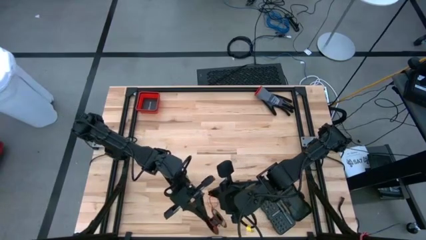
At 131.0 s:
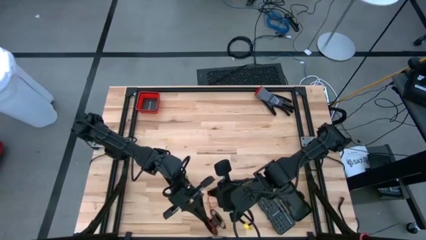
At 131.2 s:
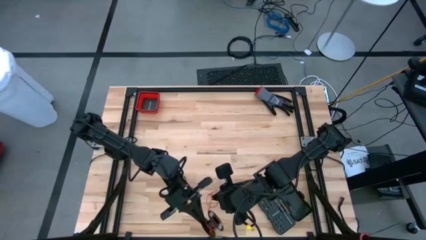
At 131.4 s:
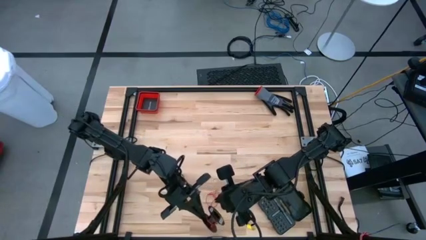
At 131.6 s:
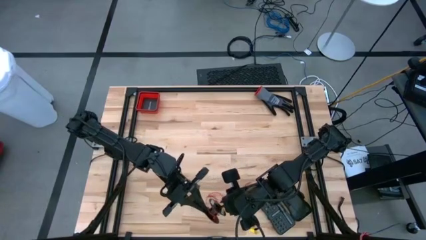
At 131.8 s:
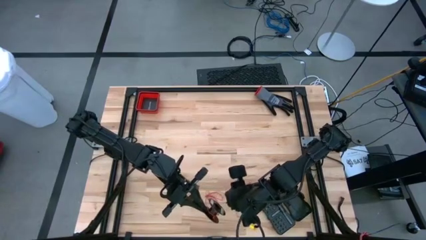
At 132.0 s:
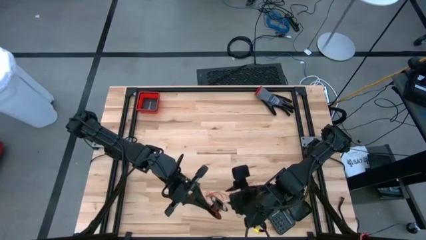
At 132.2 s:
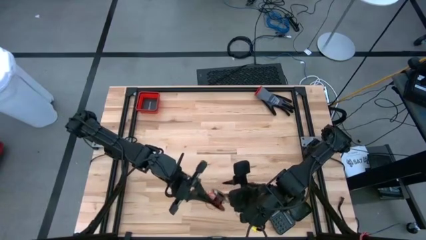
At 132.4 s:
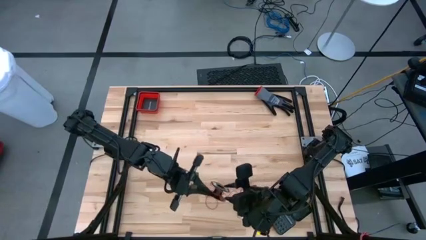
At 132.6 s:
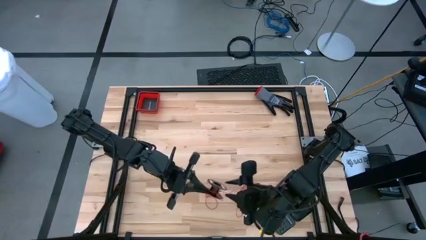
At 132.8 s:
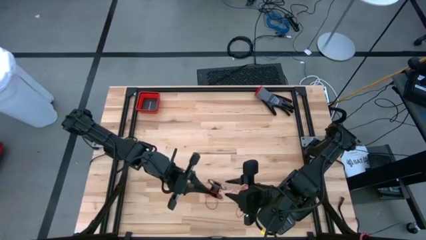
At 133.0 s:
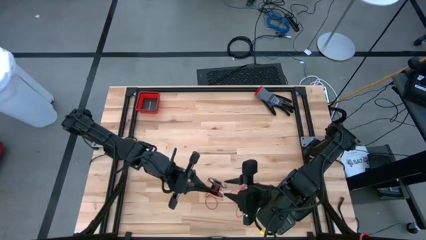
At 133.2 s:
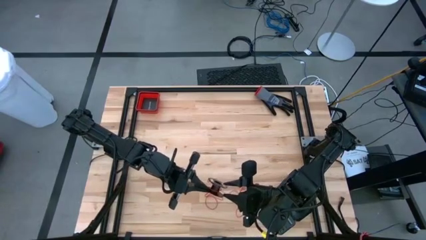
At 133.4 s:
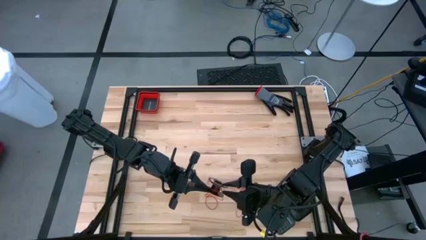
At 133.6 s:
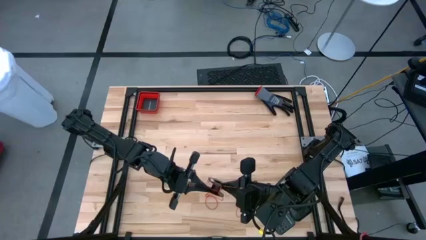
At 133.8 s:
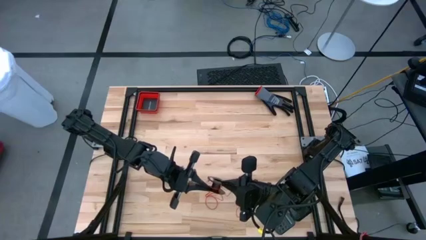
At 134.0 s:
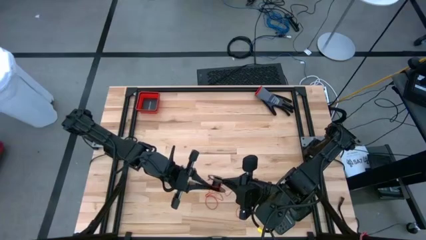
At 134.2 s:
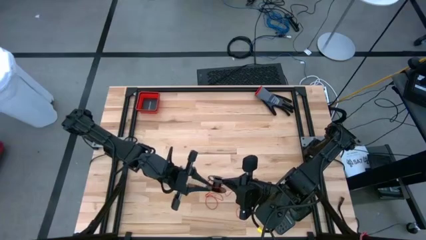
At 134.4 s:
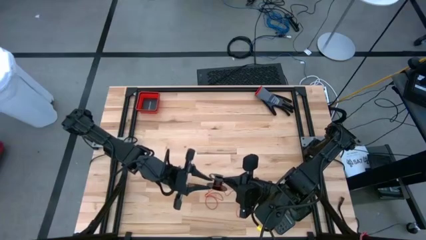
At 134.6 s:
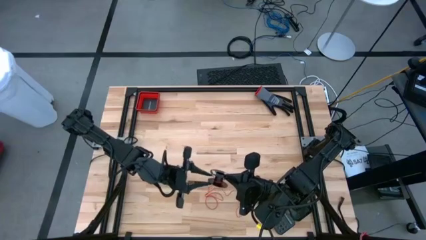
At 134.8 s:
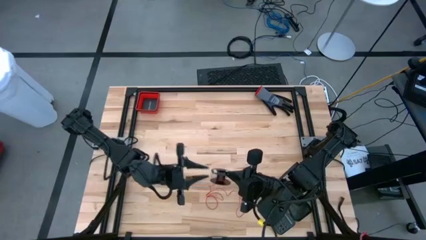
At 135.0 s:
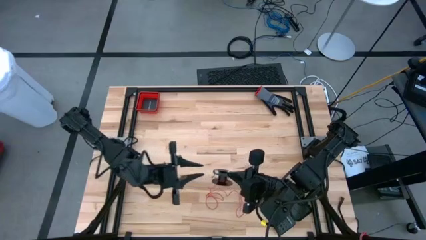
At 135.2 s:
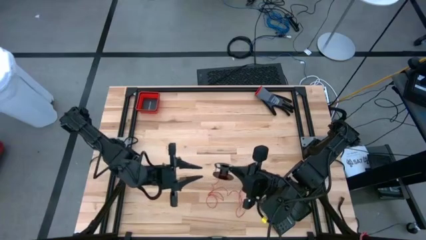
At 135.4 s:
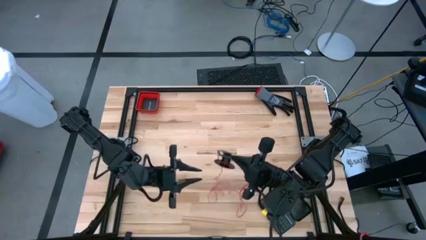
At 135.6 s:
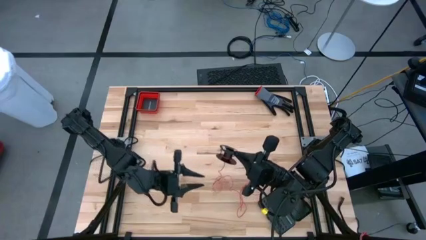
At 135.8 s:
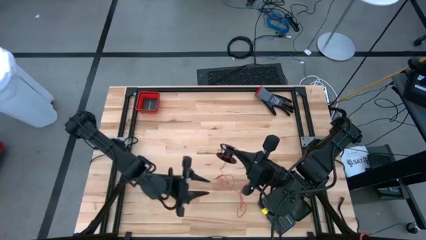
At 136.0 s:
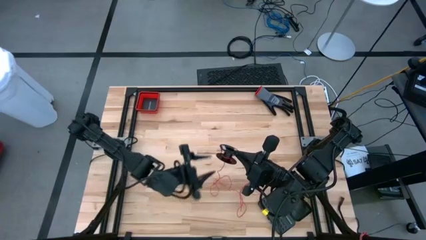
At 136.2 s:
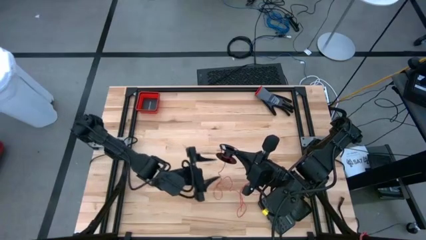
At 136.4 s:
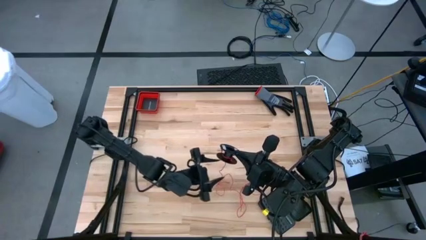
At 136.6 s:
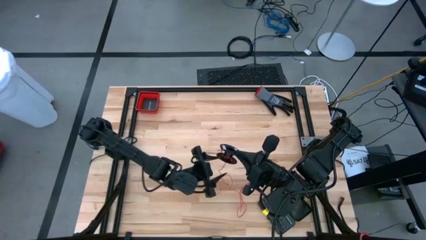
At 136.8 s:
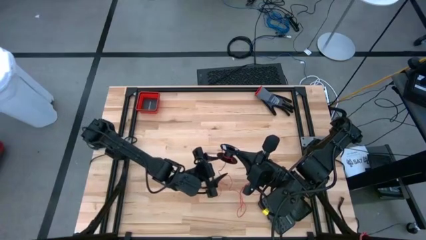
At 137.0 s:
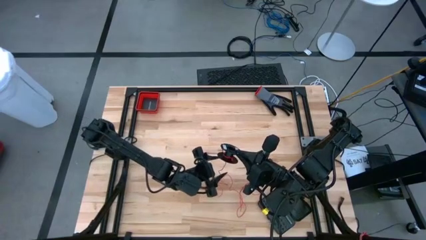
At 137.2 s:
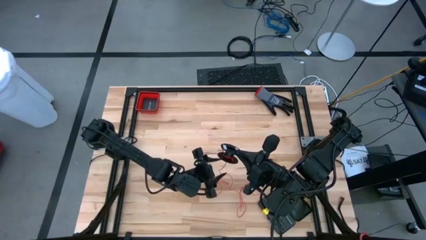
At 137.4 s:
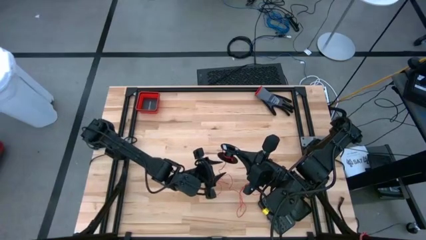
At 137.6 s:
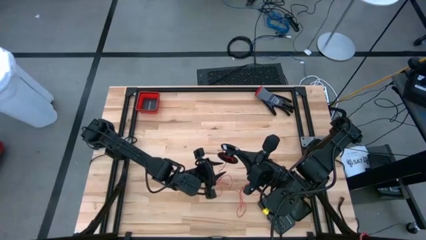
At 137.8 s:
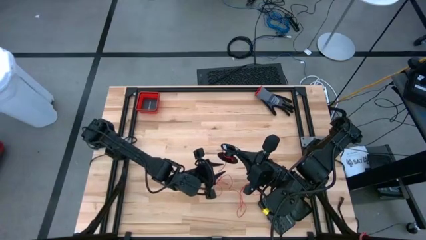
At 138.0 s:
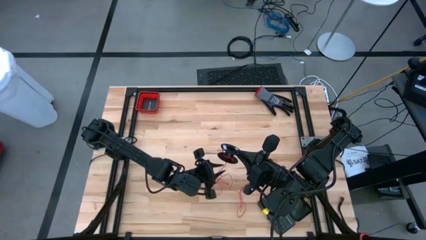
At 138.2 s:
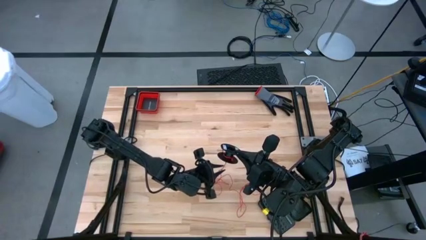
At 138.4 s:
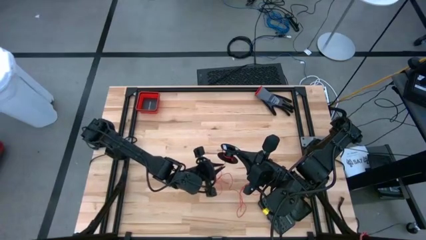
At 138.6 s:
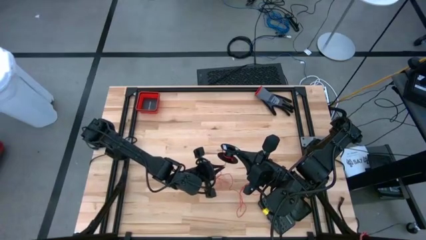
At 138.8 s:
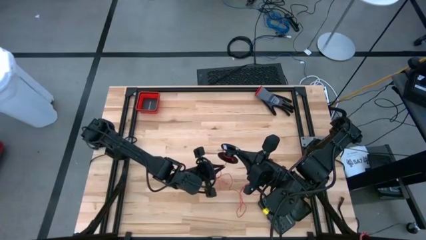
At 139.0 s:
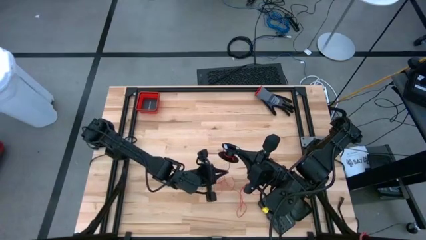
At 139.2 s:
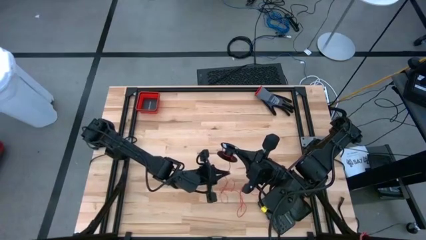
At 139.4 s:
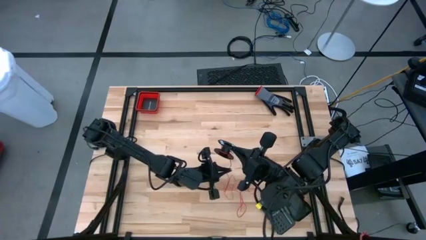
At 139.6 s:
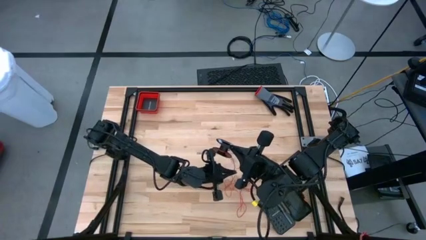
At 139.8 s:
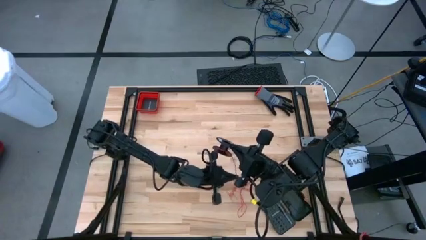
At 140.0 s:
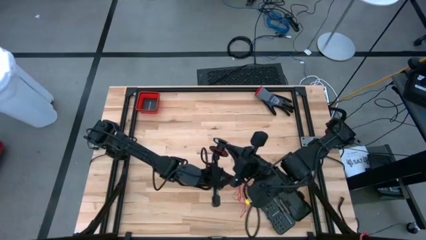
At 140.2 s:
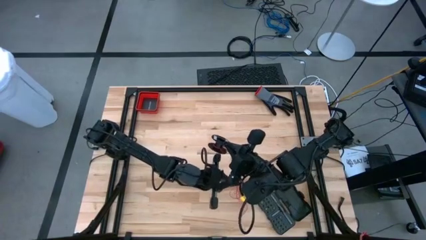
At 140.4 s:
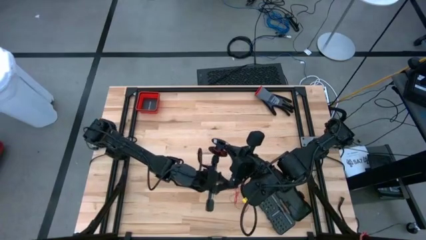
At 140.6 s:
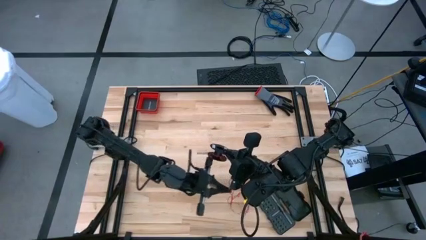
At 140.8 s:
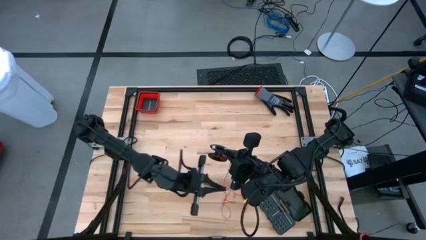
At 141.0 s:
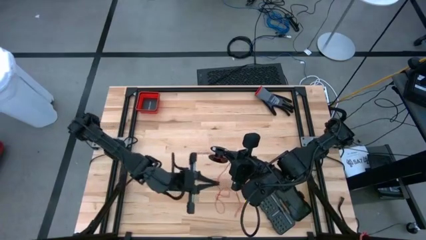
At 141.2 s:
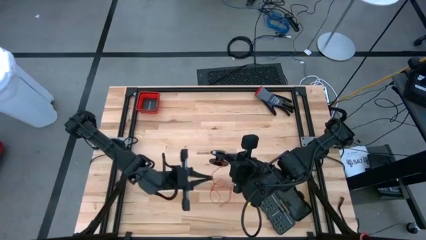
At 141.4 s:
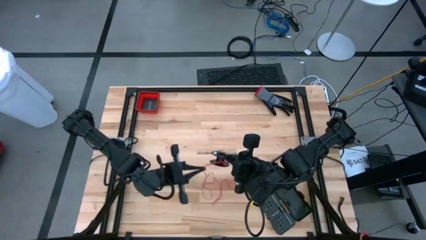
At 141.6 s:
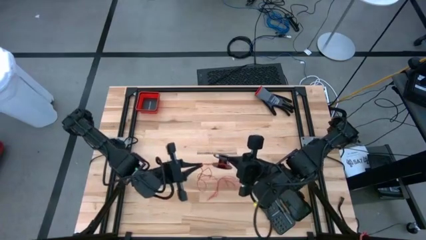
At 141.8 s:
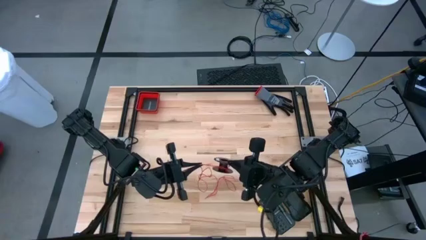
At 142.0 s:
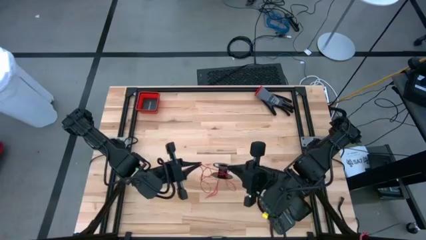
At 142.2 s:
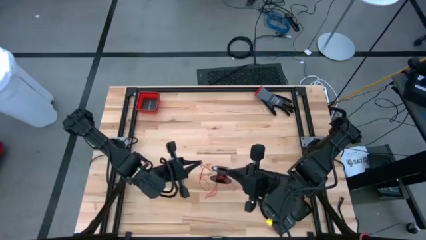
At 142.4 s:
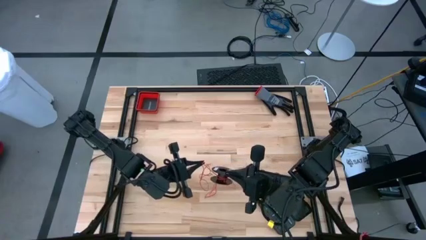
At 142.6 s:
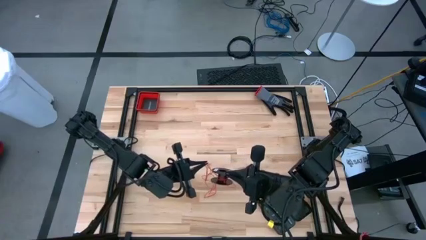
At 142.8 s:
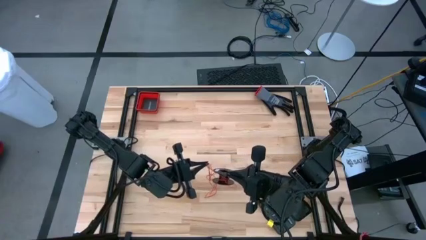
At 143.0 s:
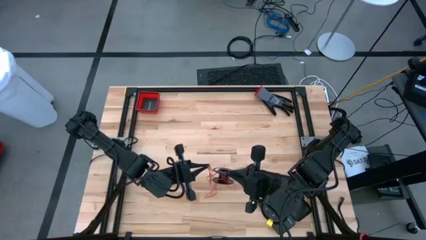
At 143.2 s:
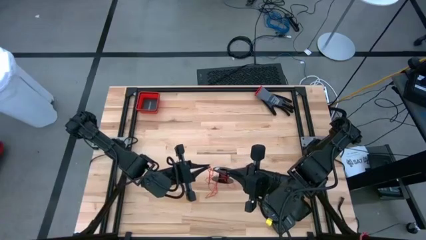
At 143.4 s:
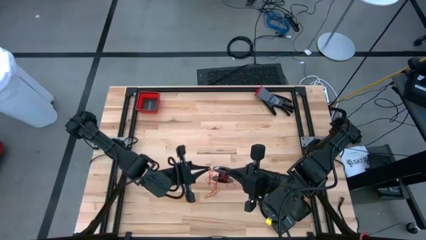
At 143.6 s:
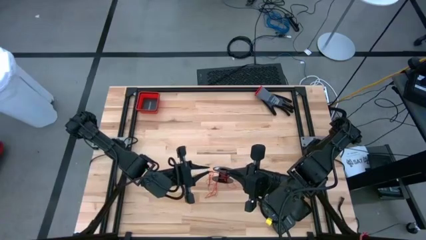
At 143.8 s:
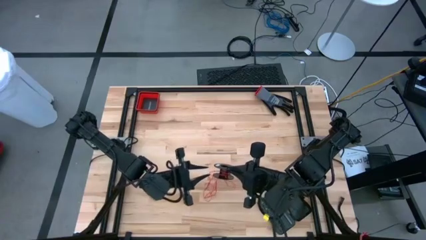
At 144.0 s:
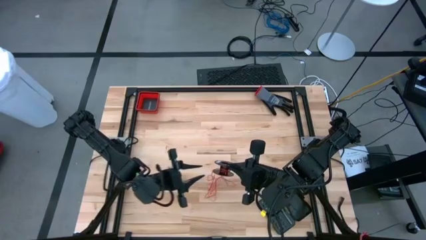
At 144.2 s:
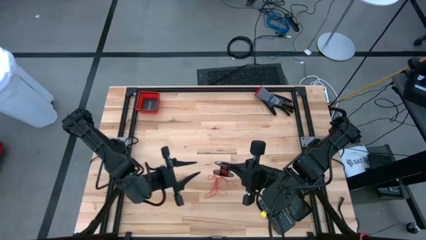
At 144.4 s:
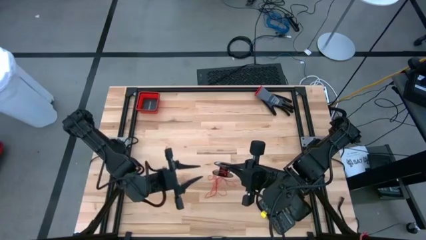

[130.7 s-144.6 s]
Task: Coil cords
Coil the red wire onto the spool
